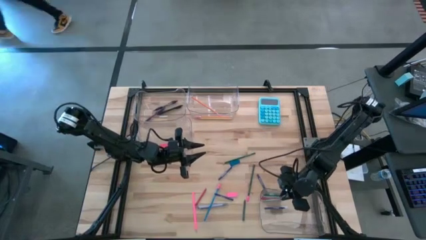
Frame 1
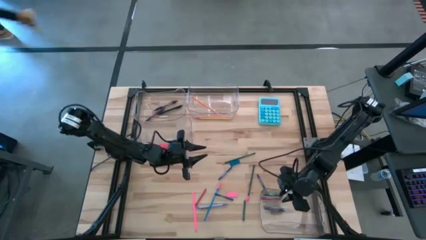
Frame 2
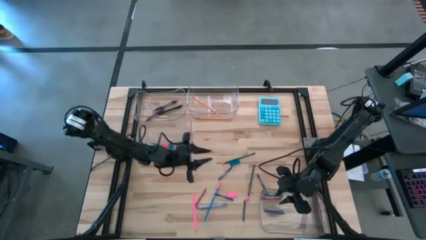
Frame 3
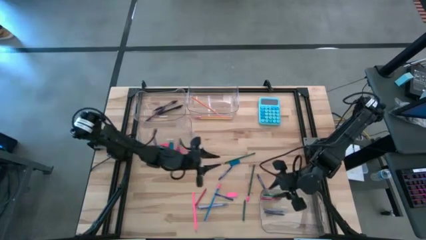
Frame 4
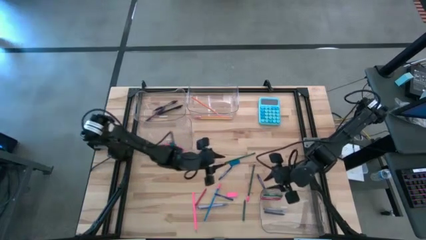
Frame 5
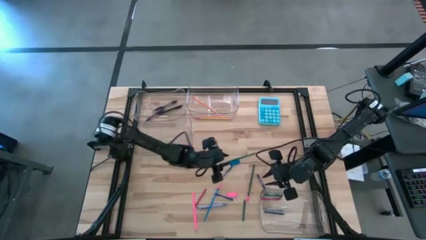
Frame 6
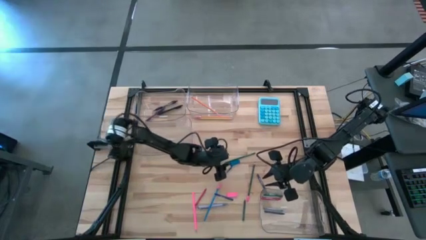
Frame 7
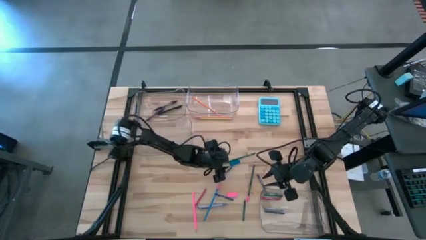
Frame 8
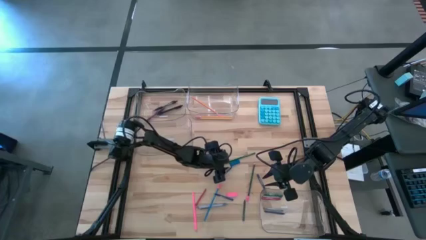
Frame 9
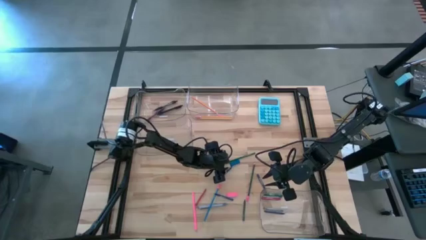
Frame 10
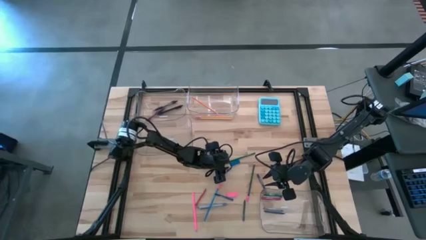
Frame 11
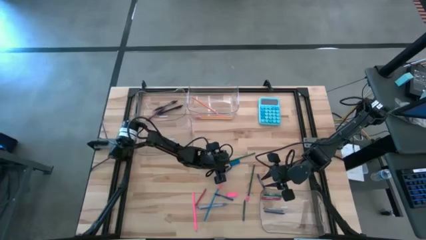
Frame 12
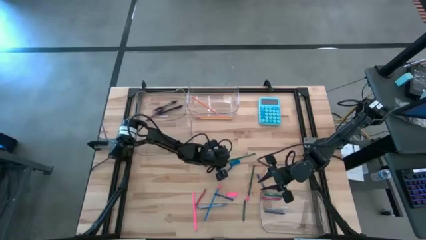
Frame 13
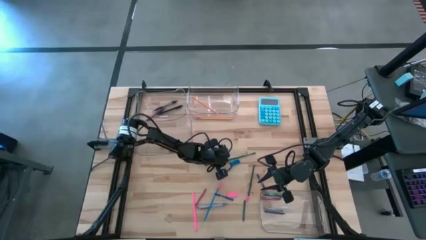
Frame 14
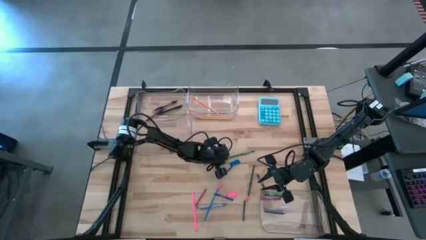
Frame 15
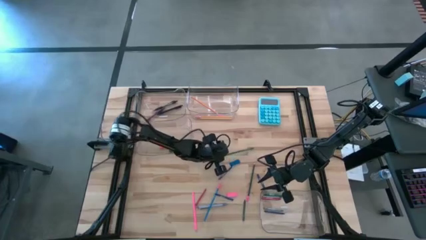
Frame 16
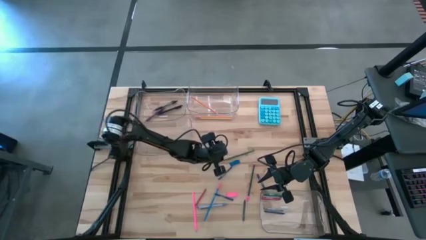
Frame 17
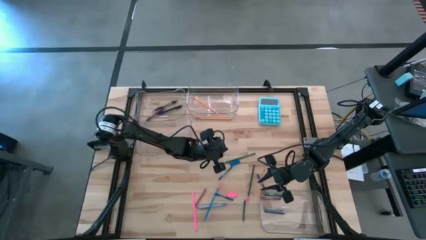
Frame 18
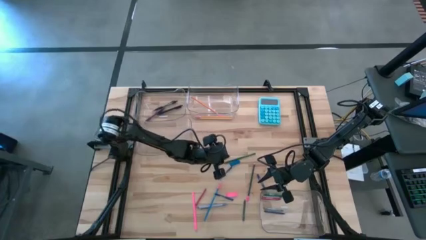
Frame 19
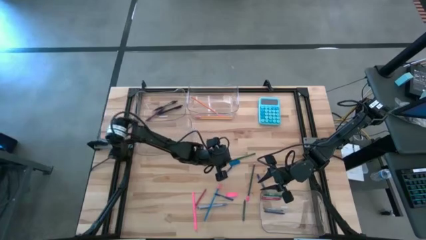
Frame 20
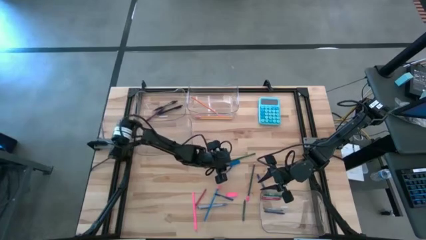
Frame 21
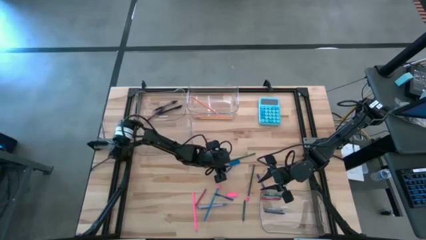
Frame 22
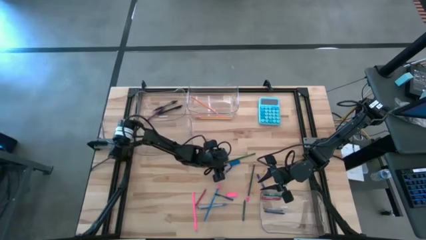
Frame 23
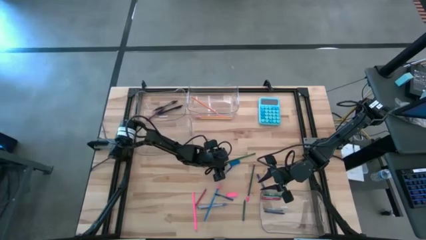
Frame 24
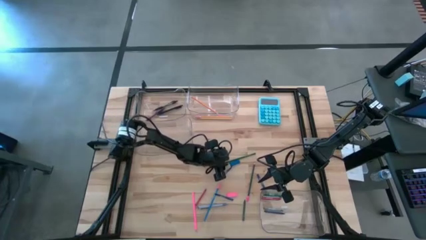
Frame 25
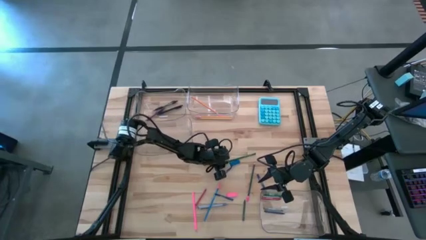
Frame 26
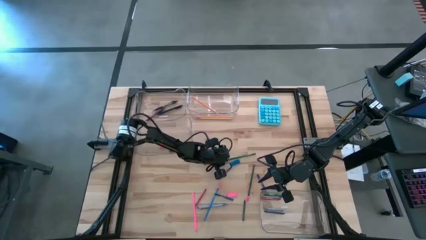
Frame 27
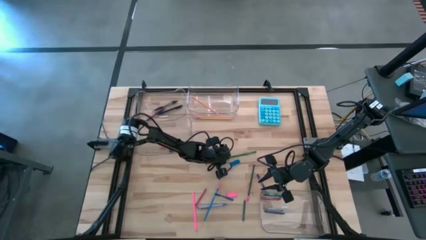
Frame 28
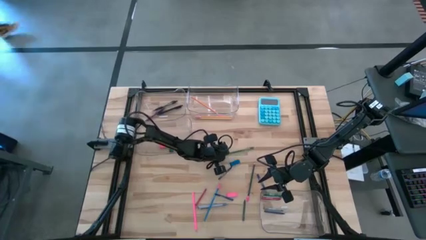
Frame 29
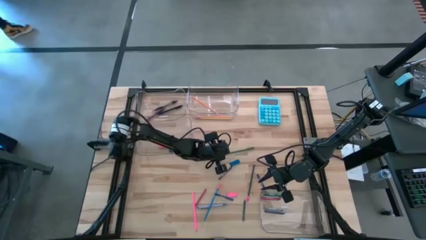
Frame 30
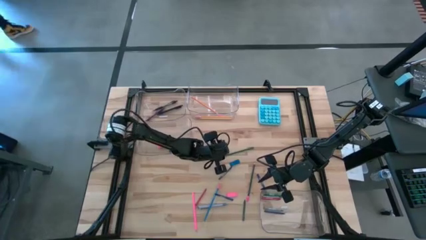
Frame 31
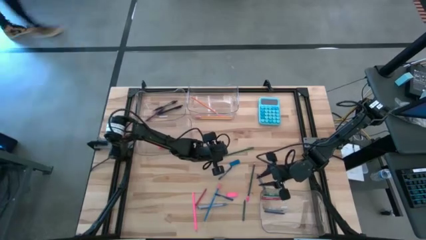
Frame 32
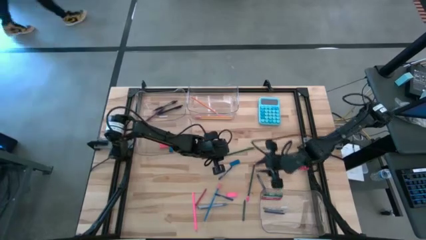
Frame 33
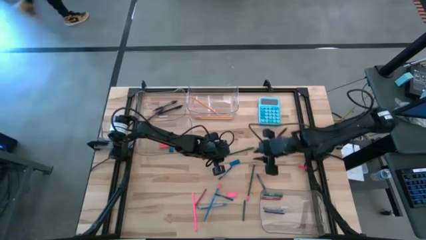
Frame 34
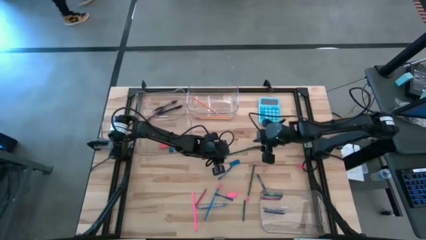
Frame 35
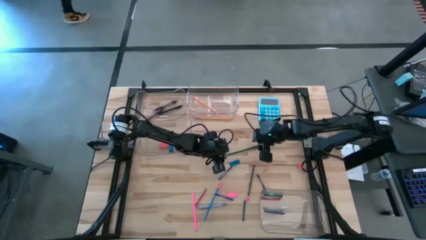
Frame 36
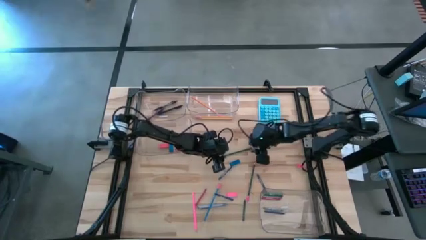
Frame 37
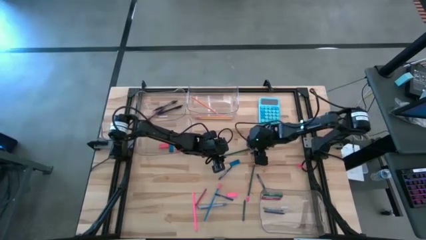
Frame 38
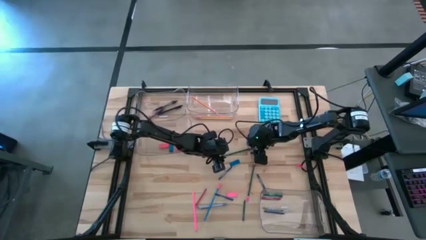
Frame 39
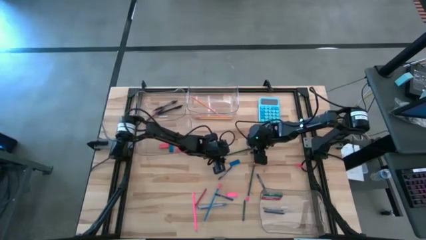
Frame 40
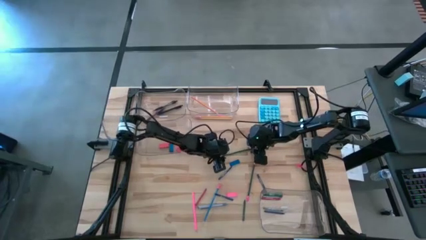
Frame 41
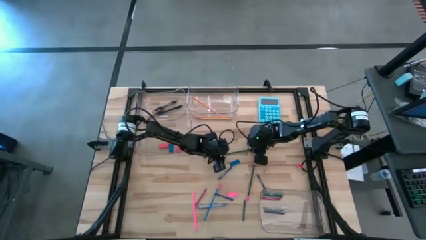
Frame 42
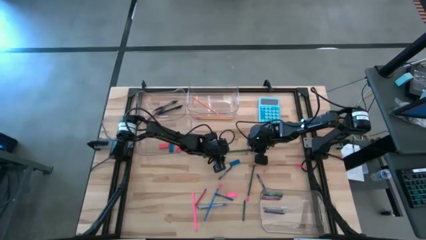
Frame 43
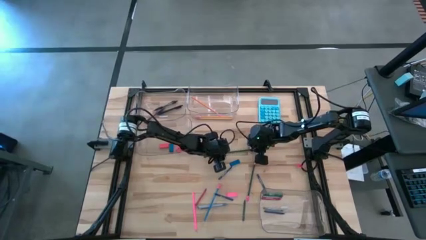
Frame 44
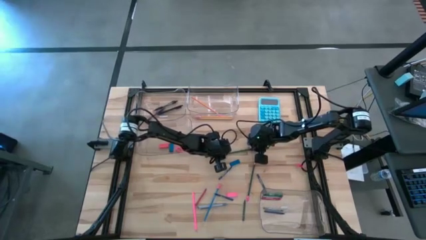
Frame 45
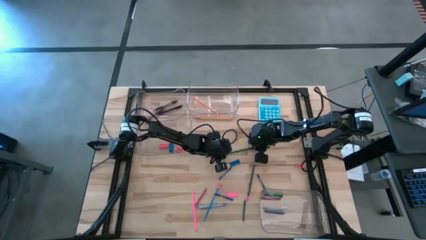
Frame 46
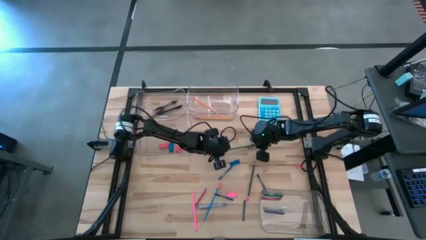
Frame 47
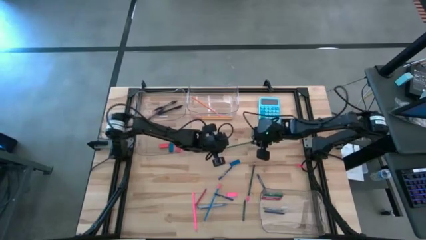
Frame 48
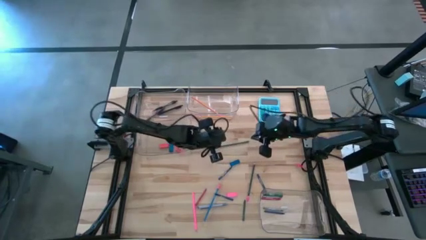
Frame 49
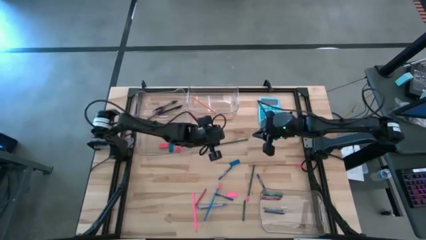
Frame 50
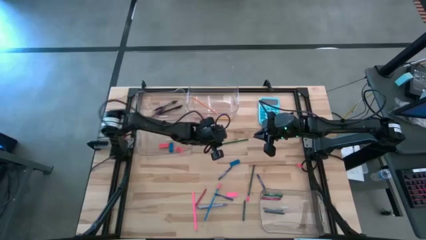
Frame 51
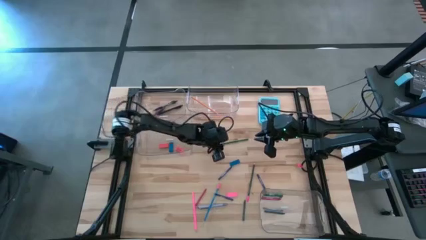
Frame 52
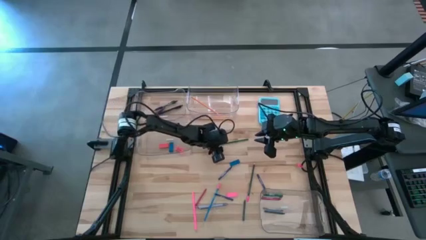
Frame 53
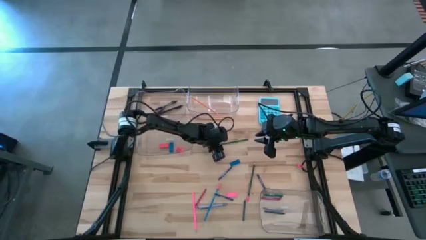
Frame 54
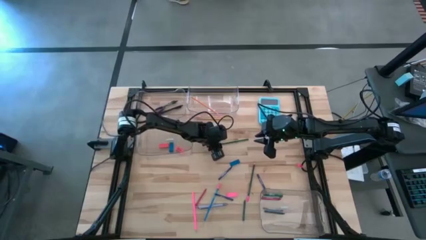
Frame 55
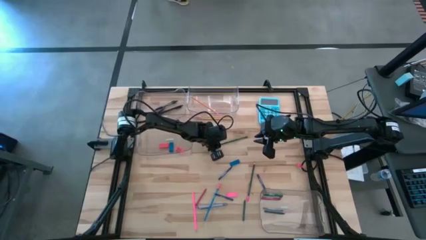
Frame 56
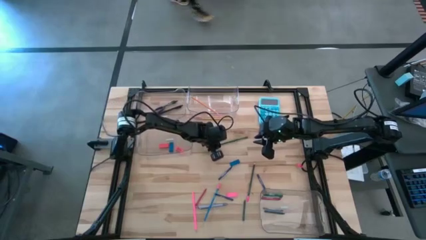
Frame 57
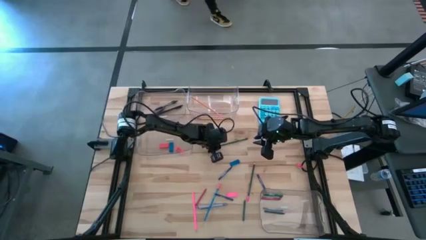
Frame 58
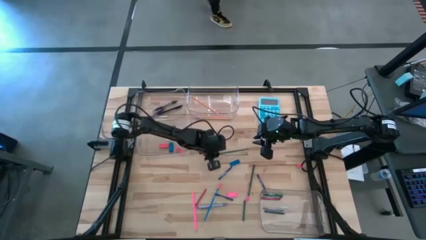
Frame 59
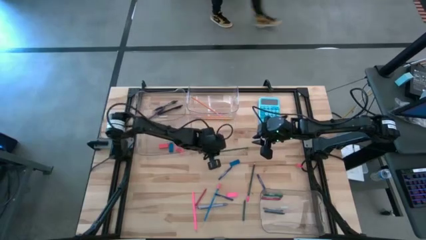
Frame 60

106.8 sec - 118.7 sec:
Task: Sort crayons/erasers/pens/pencils in bins
Put the green pencil into the top right transparent bin

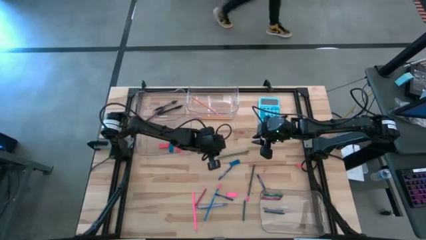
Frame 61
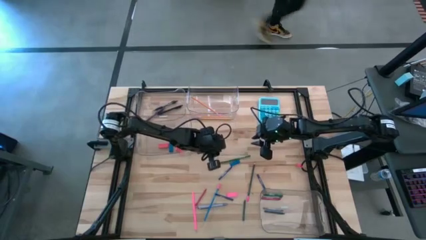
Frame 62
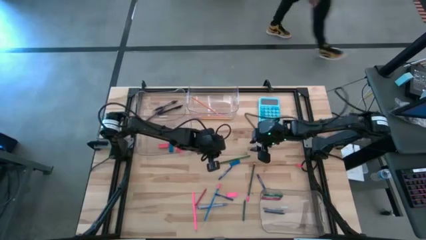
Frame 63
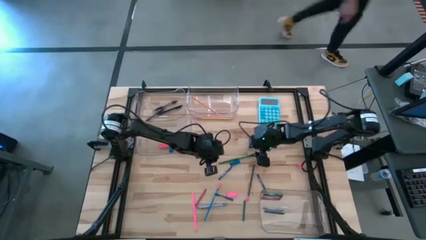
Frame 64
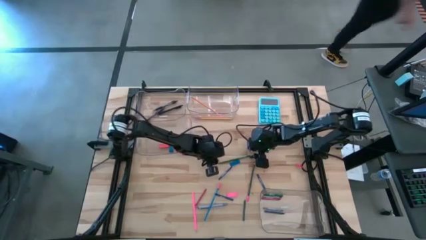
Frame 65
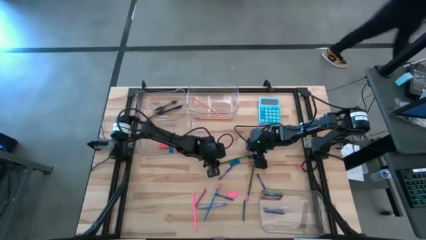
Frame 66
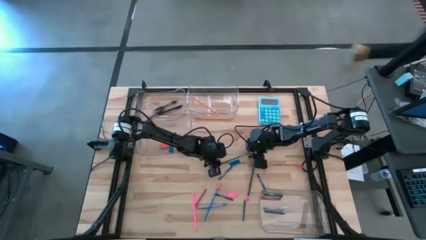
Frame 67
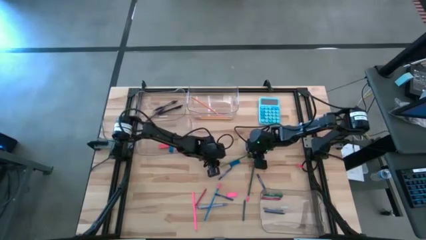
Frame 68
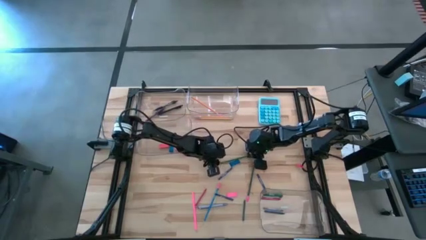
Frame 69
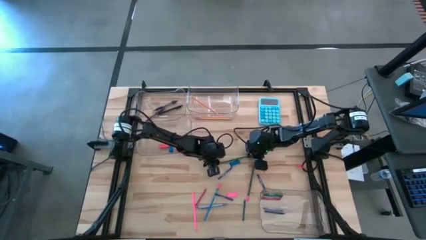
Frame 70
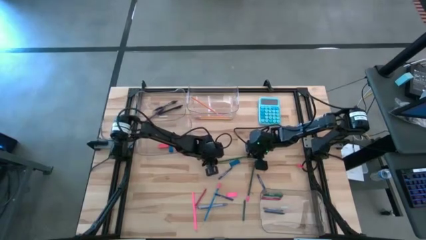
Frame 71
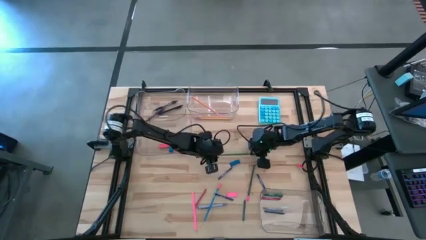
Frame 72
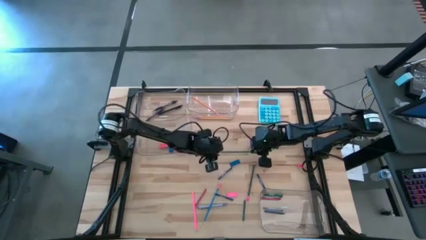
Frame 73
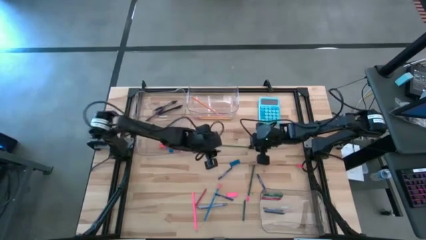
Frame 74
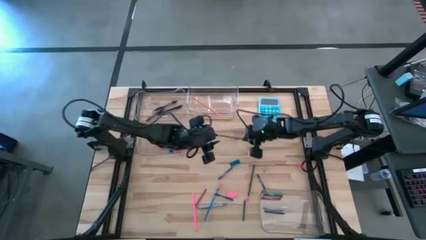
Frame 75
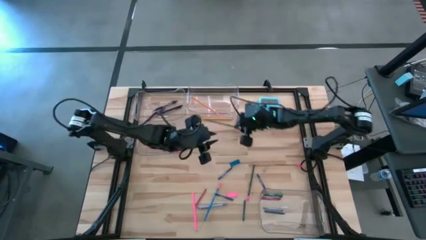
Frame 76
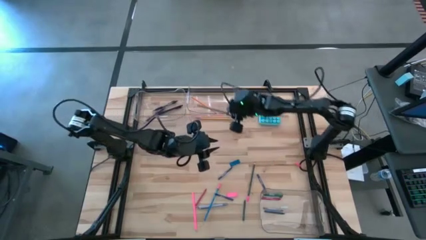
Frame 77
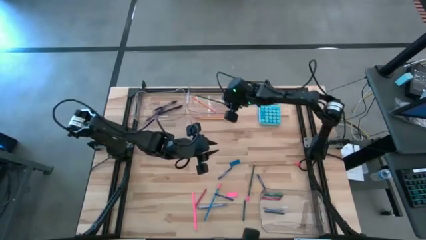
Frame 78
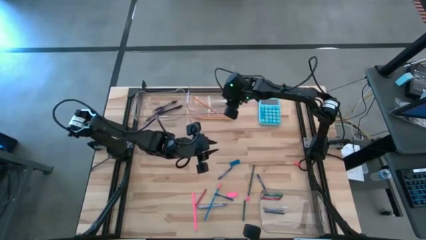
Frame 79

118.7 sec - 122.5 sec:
Put the green pencil into the top right transparent bin
